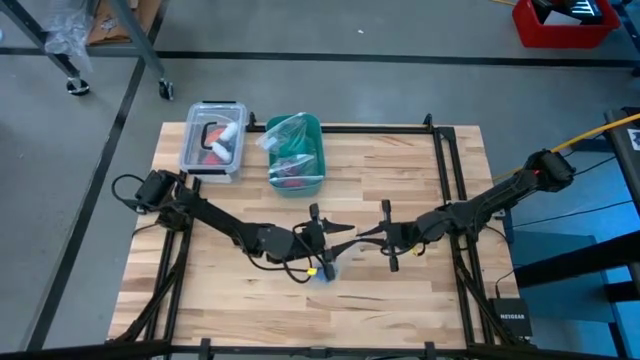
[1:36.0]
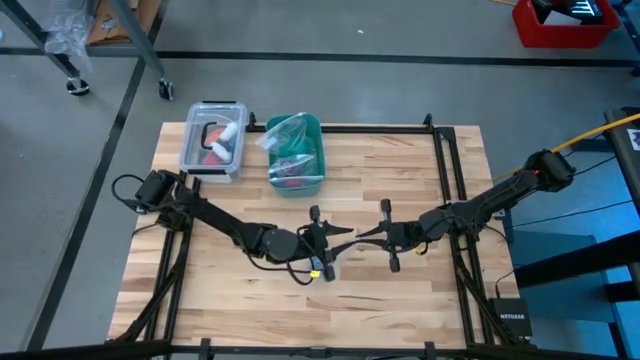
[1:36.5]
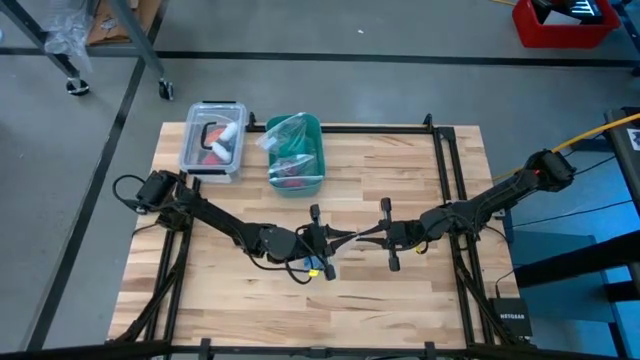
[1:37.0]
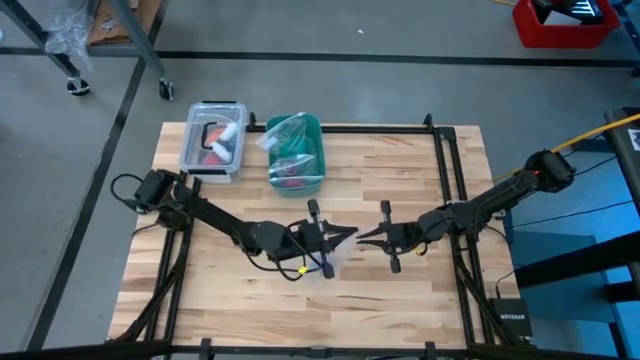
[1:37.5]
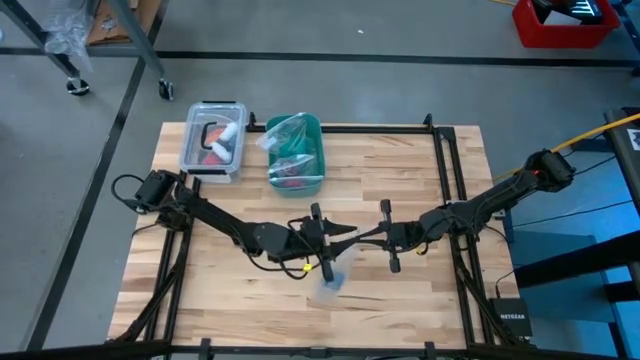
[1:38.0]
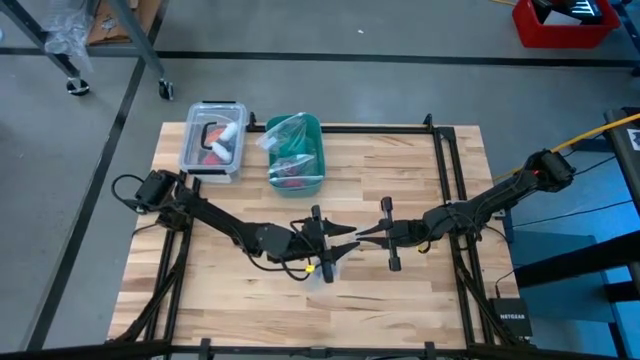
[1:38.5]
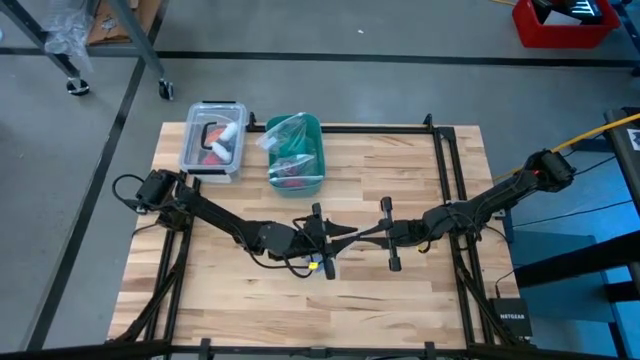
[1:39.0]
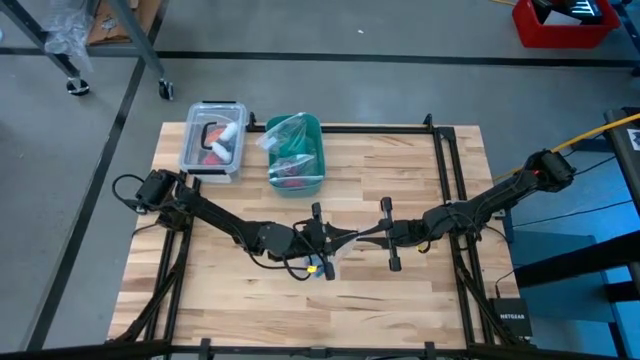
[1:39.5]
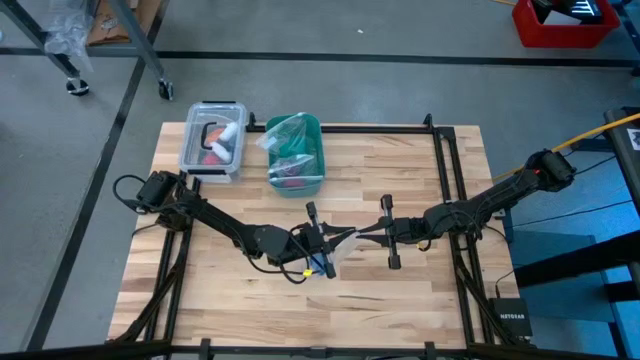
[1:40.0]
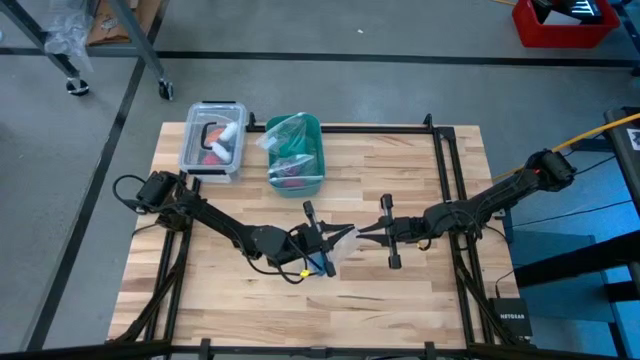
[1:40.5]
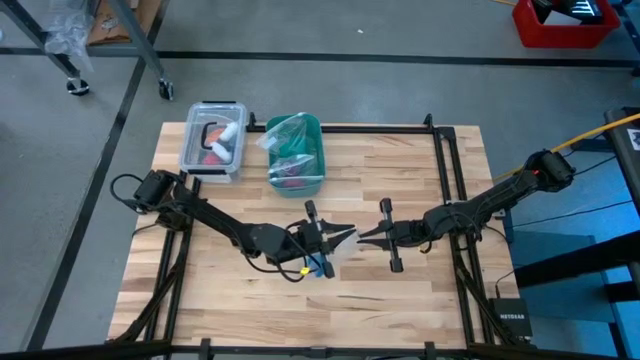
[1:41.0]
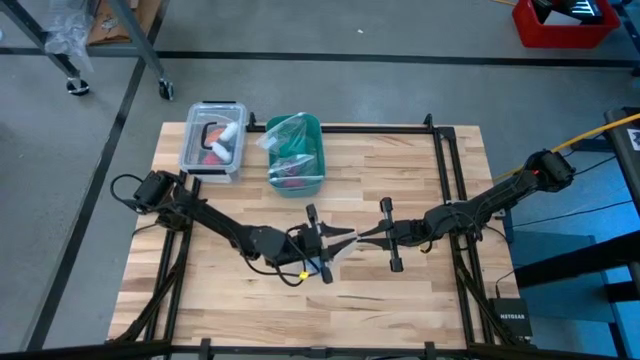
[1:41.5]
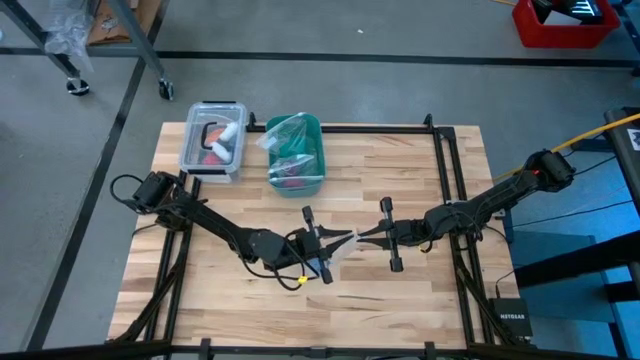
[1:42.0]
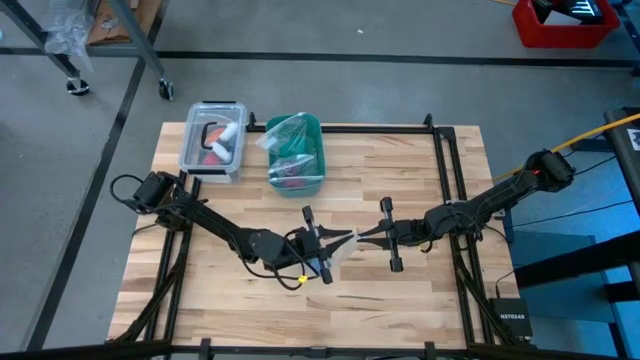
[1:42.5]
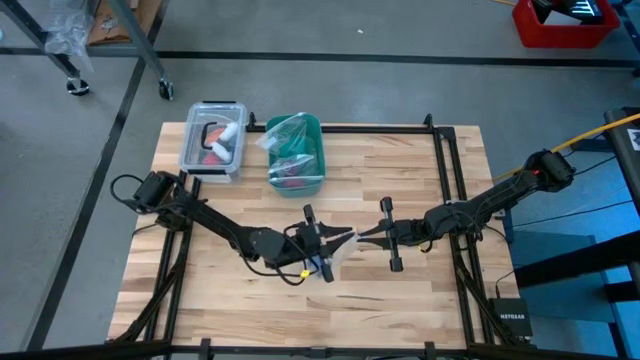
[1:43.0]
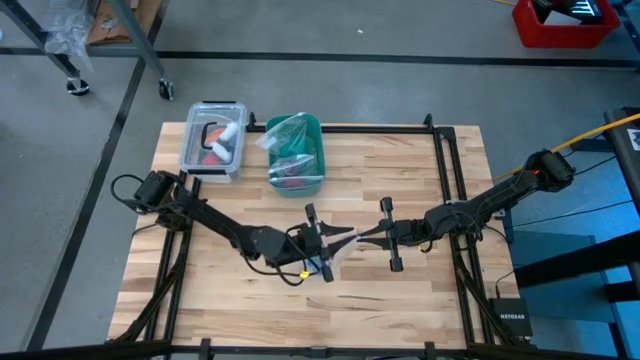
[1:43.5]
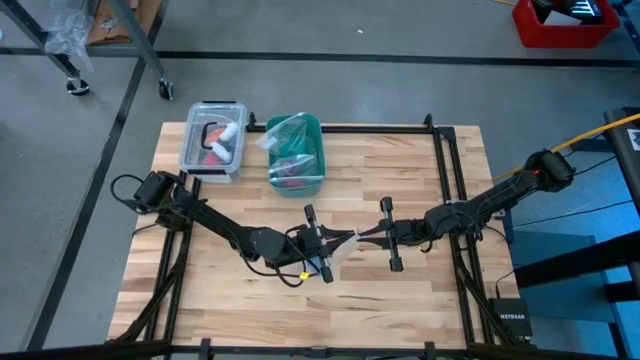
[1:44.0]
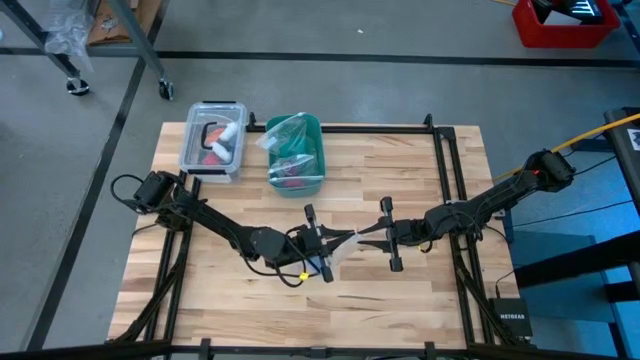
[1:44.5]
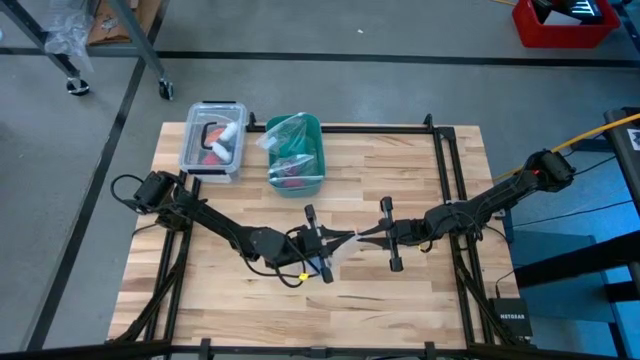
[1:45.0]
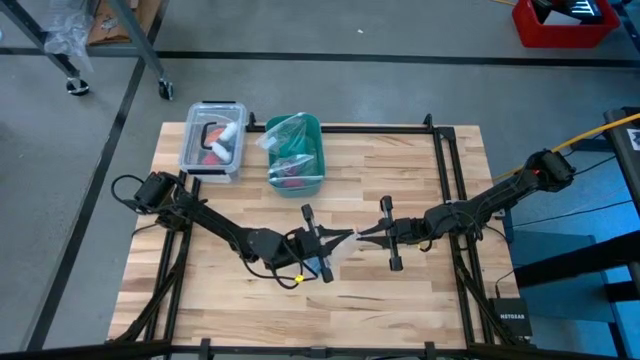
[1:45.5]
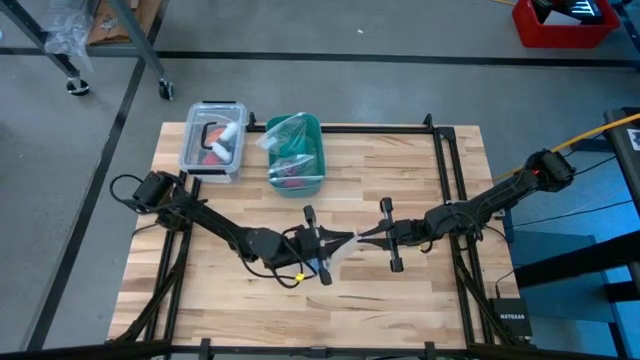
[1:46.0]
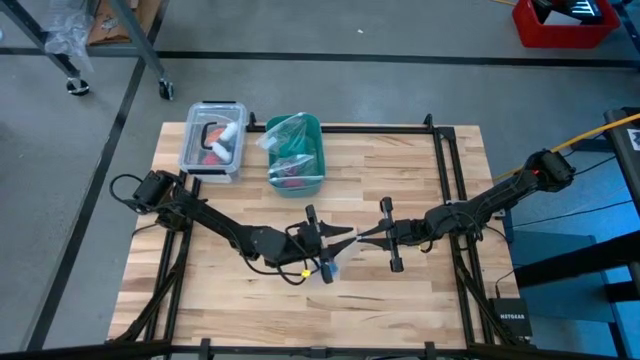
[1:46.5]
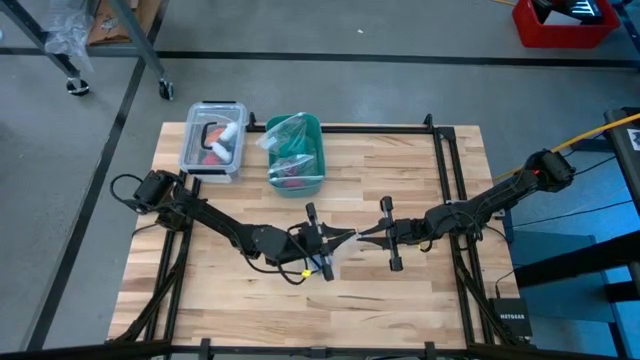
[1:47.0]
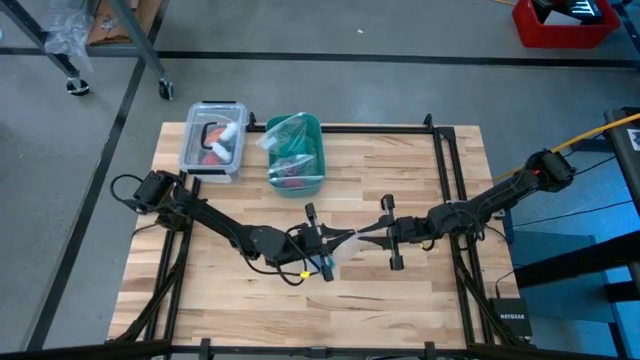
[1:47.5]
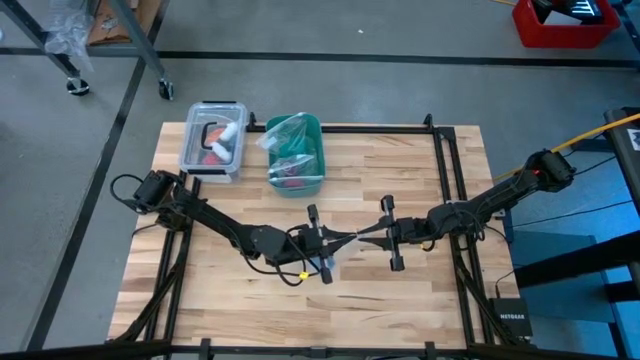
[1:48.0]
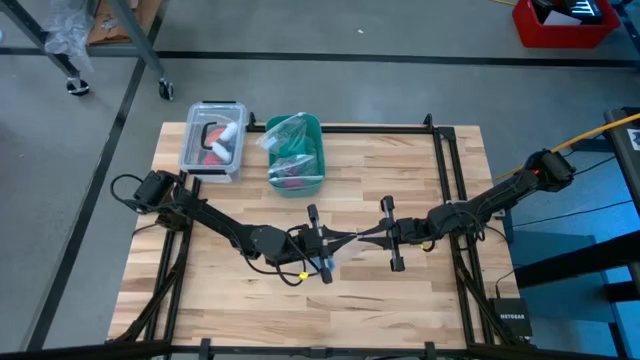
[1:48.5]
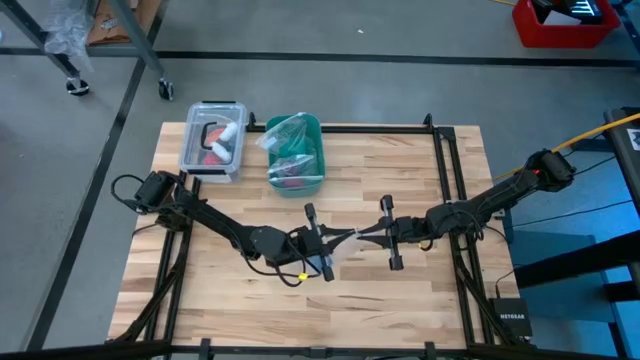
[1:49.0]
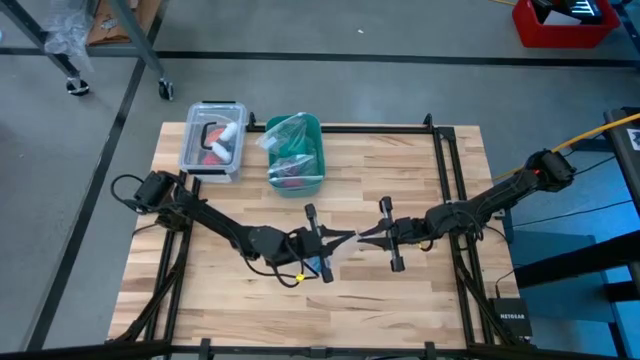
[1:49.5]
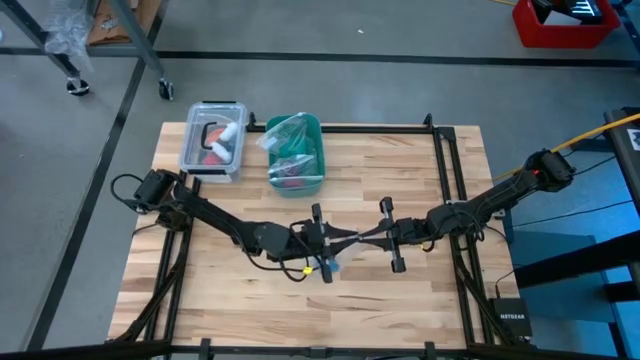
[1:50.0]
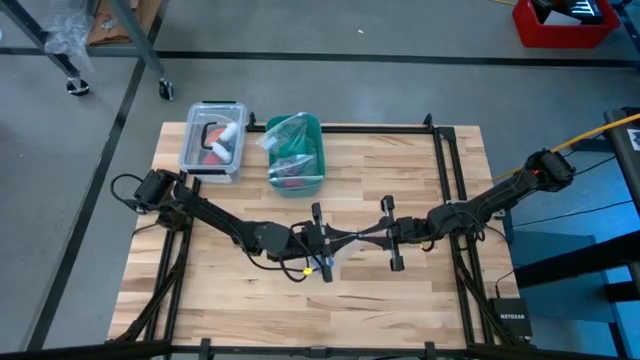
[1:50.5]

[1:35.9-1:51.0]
Task: Roll bandage
Close the transparent zip bag

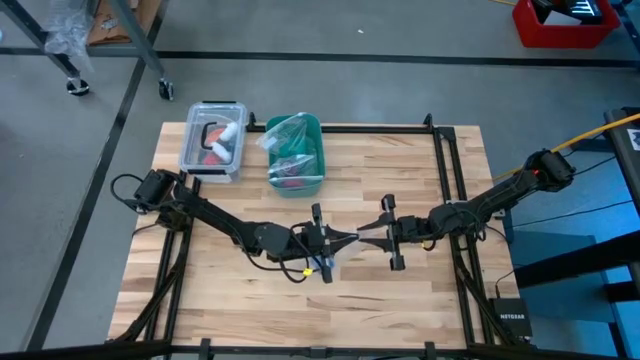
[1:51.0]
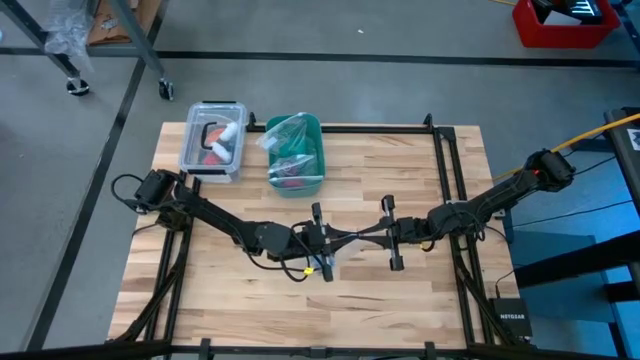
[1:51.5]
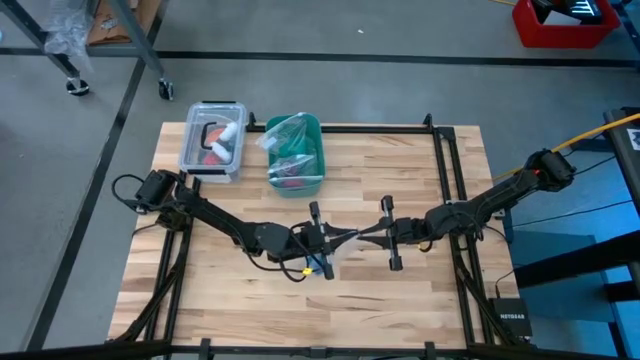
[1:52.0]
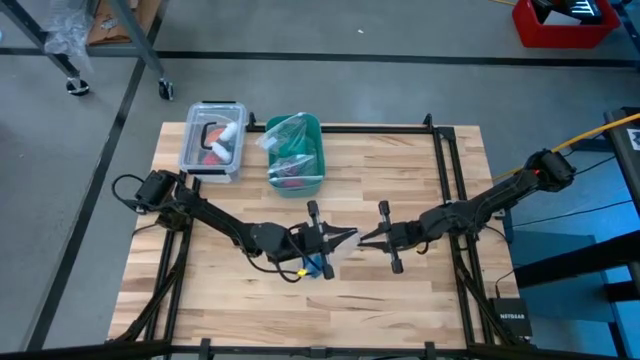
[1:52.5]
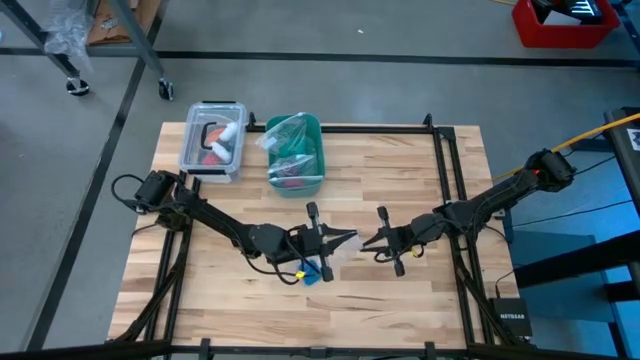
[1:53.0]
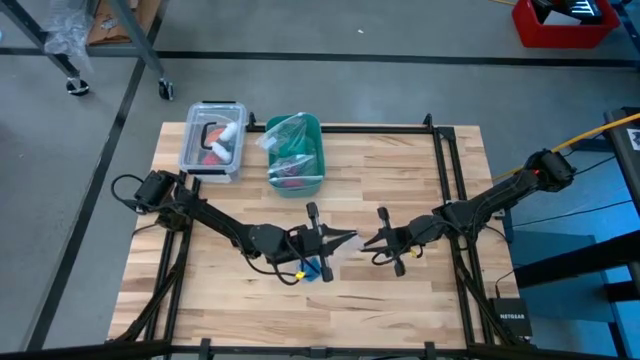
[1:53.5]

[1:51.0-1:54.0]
Close the transparent zip bag

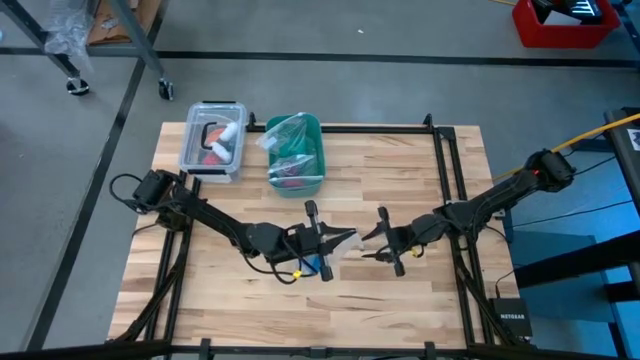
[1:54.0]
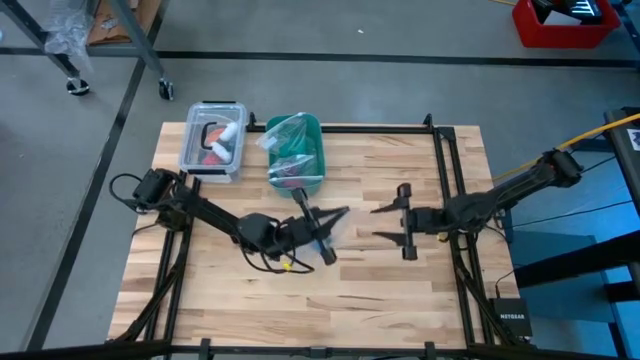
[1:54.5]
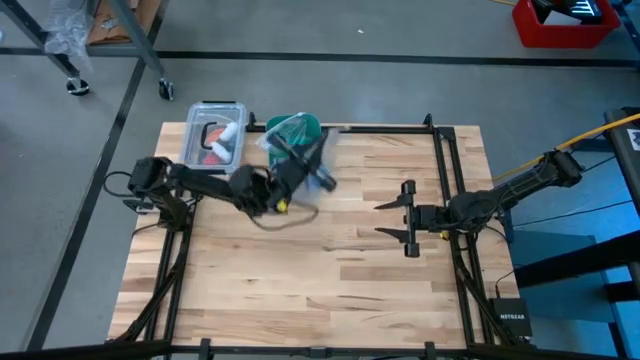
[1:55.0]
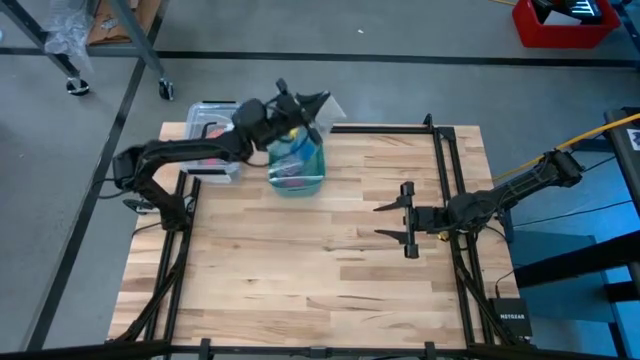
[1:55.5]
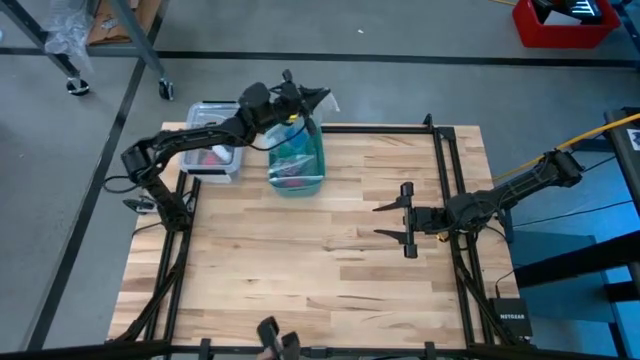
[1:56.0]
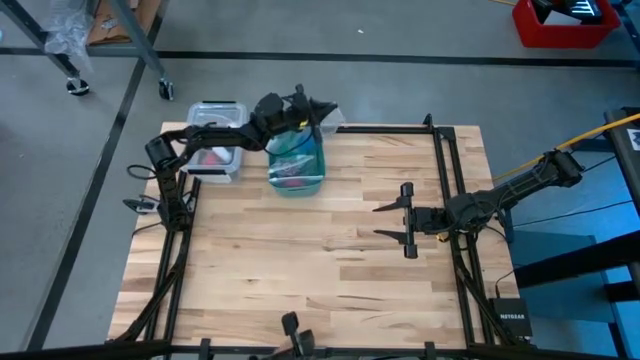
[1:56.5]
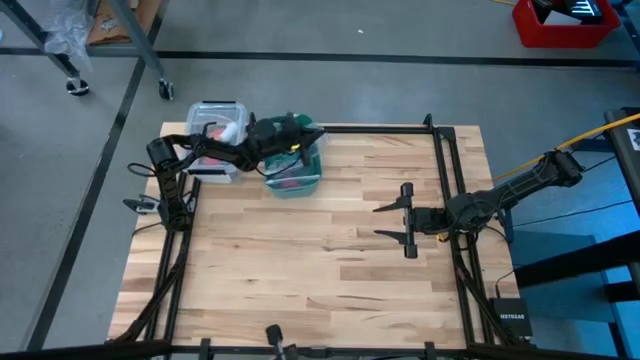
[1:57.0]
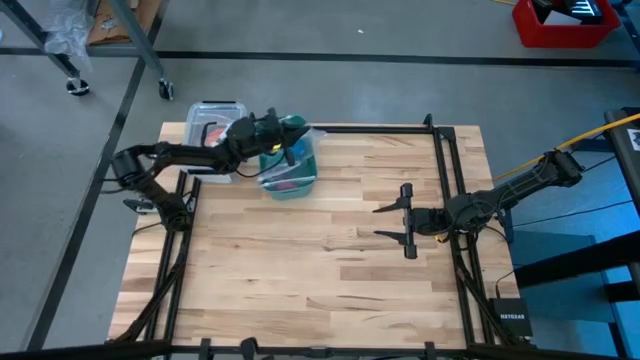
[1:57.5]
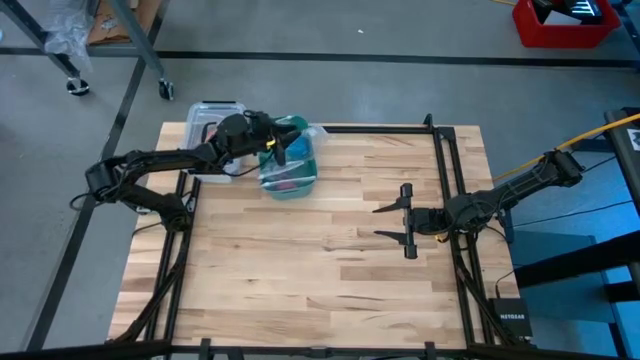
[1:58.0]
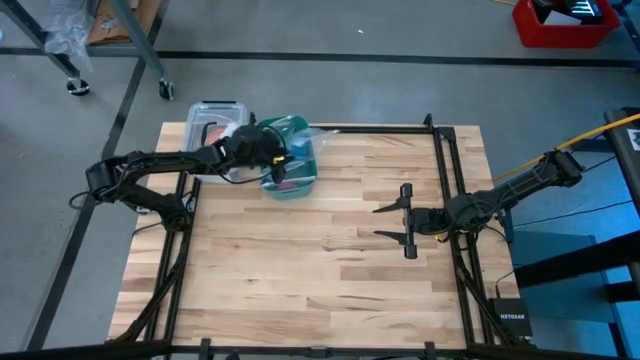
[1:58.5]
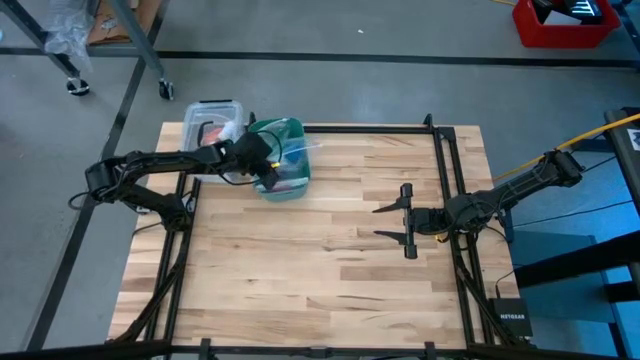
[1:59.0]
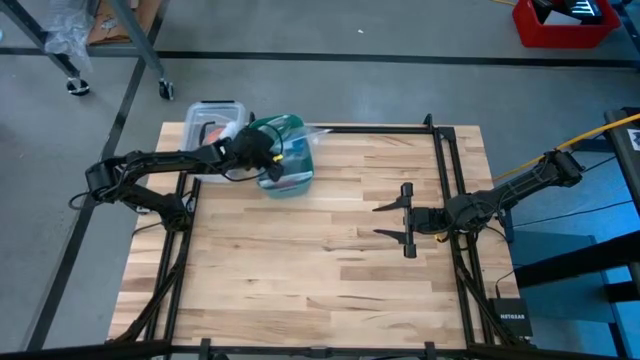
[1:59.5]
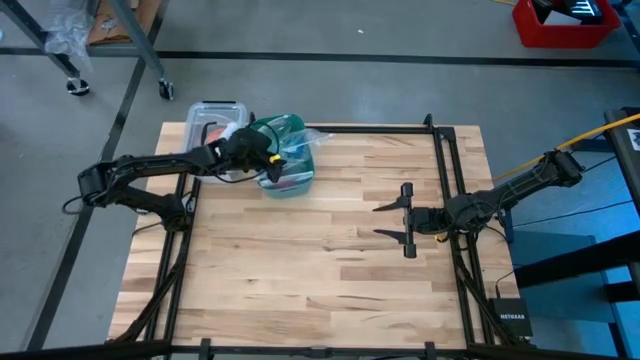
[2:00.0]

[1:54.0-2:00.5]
Put the transparent zip bag into the green bin
